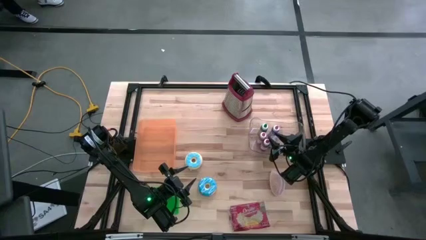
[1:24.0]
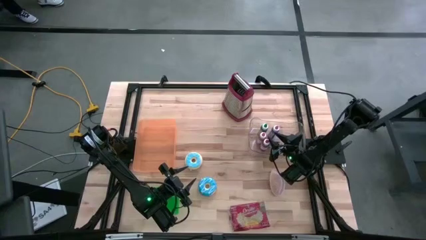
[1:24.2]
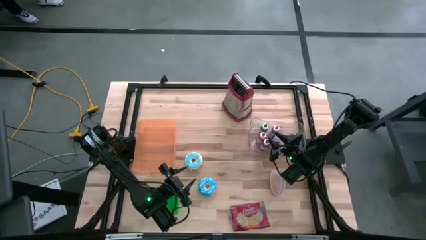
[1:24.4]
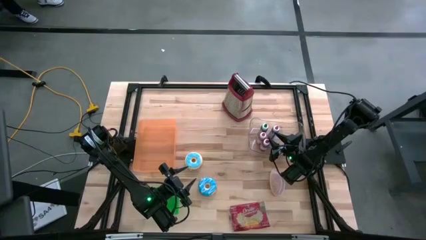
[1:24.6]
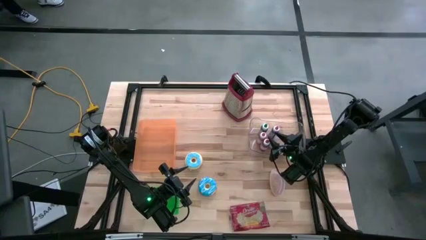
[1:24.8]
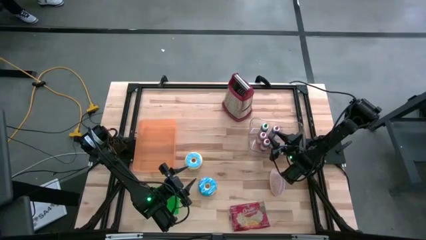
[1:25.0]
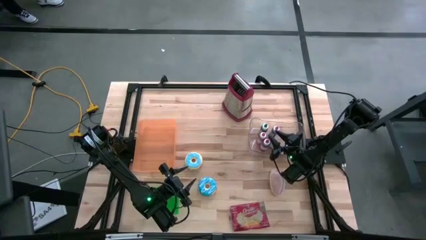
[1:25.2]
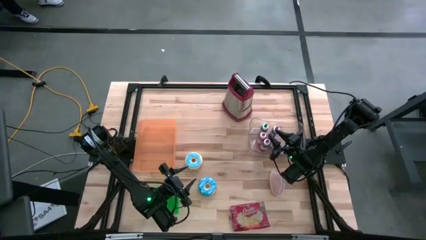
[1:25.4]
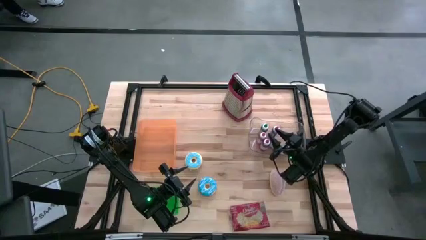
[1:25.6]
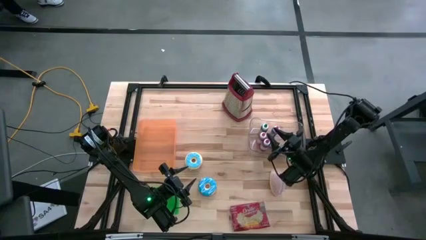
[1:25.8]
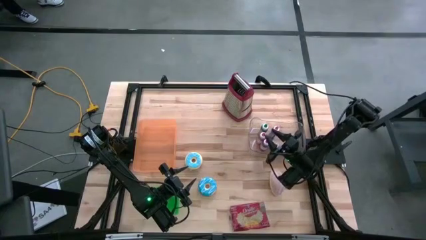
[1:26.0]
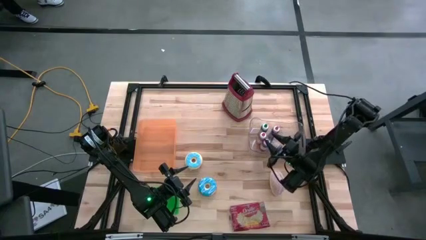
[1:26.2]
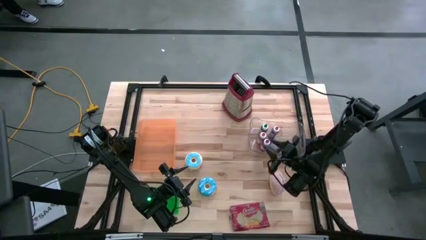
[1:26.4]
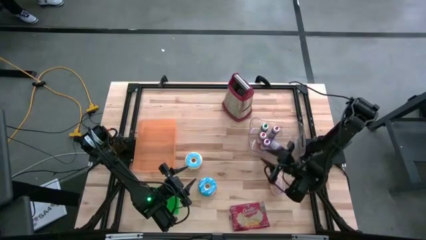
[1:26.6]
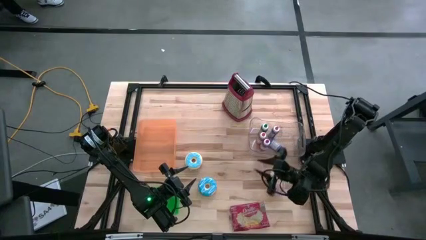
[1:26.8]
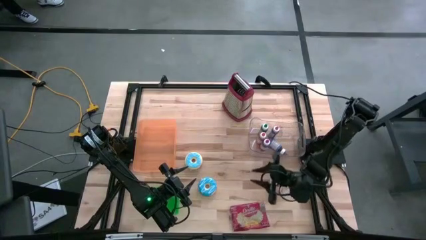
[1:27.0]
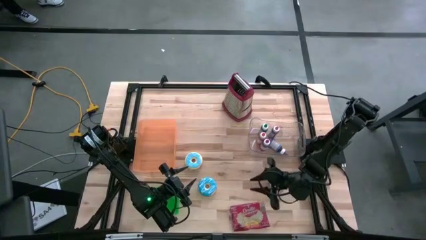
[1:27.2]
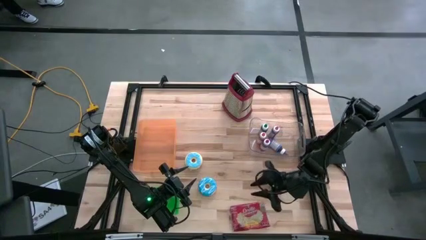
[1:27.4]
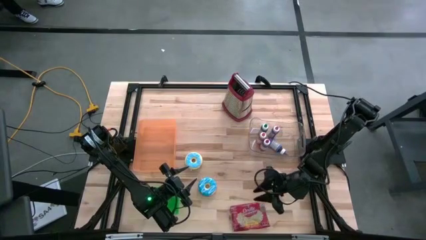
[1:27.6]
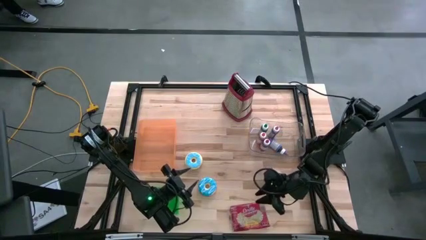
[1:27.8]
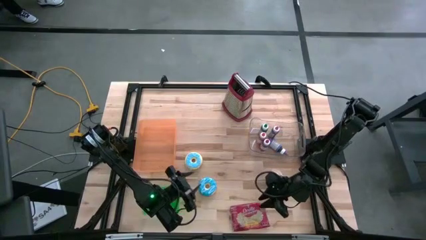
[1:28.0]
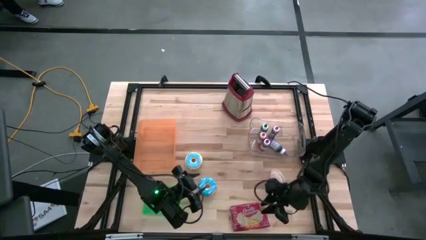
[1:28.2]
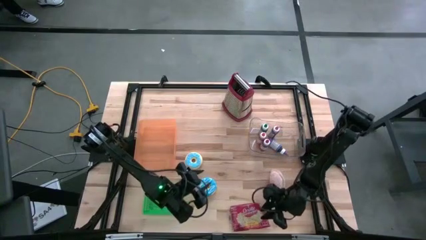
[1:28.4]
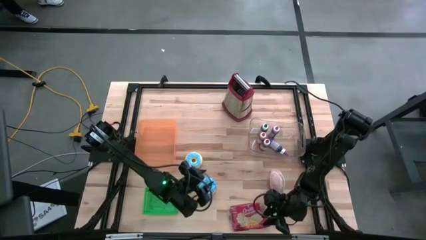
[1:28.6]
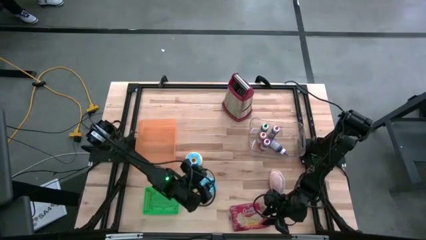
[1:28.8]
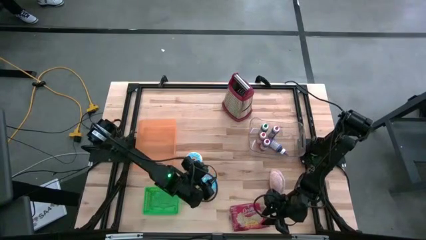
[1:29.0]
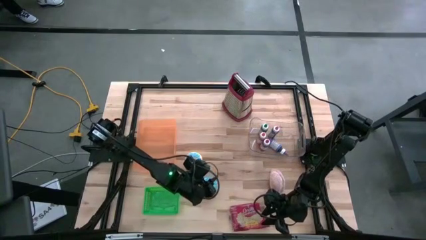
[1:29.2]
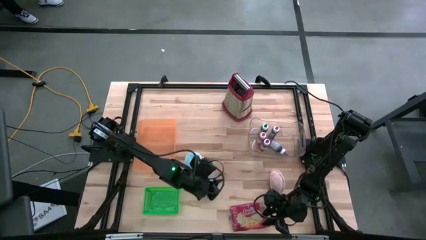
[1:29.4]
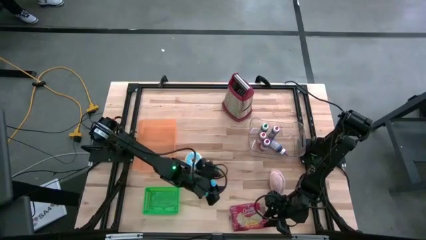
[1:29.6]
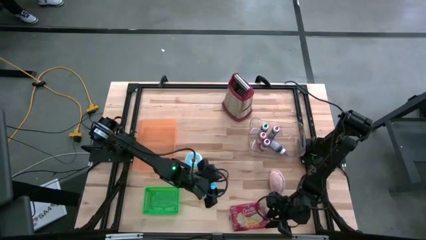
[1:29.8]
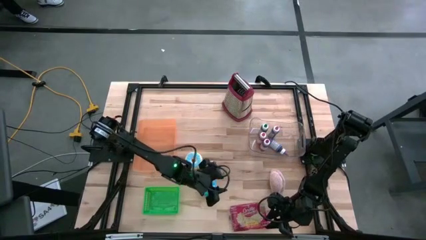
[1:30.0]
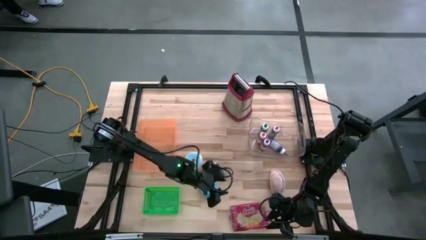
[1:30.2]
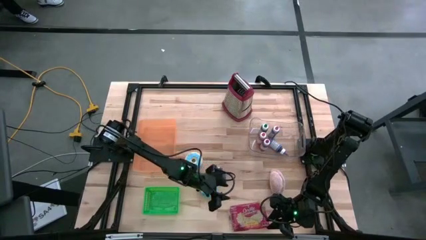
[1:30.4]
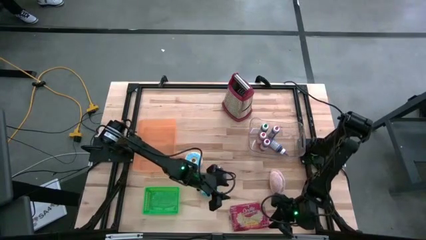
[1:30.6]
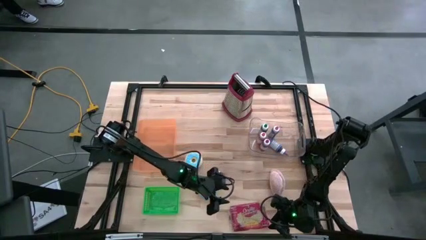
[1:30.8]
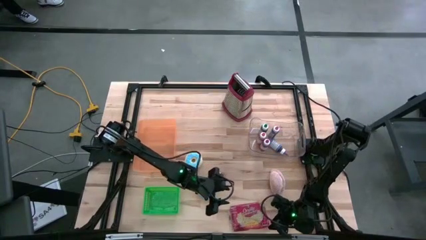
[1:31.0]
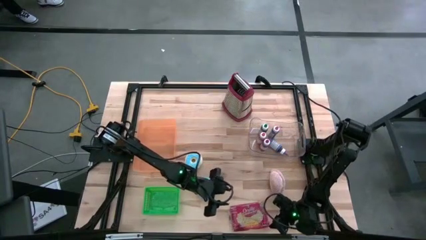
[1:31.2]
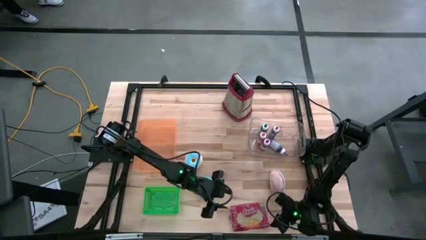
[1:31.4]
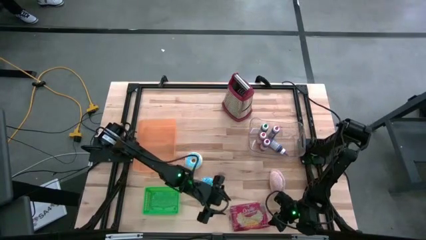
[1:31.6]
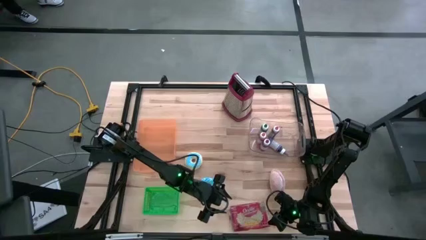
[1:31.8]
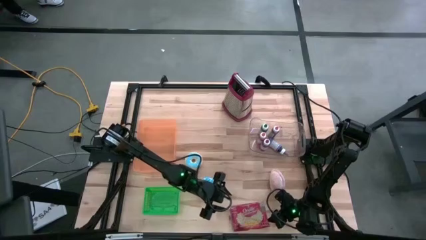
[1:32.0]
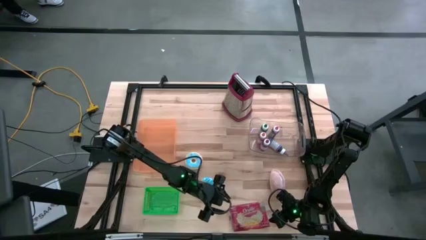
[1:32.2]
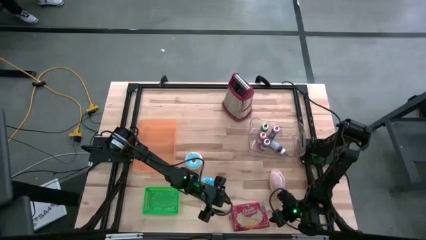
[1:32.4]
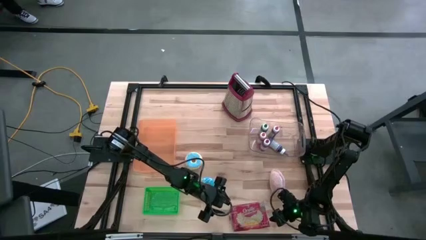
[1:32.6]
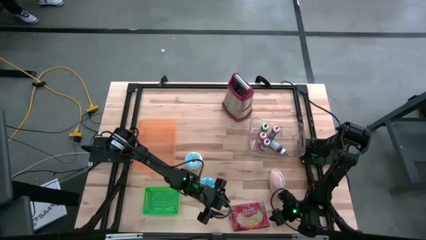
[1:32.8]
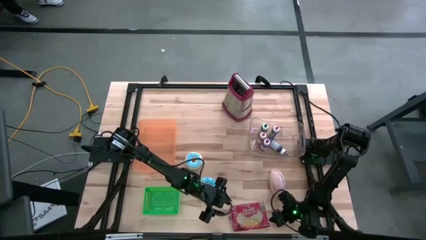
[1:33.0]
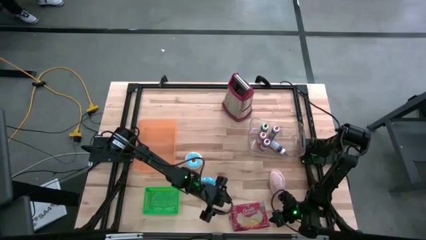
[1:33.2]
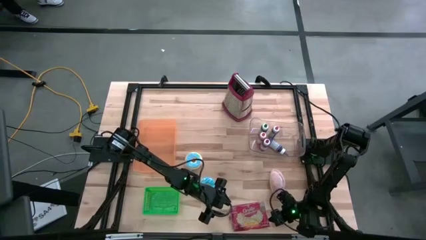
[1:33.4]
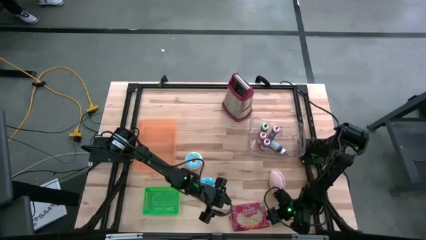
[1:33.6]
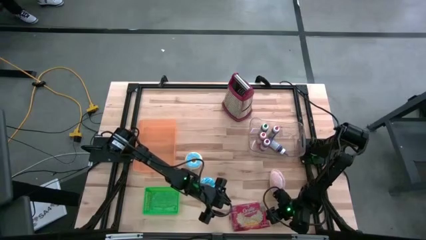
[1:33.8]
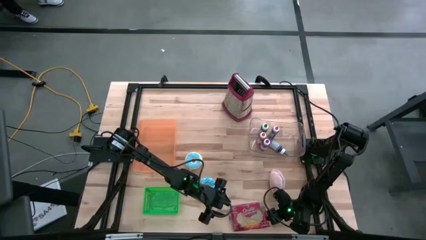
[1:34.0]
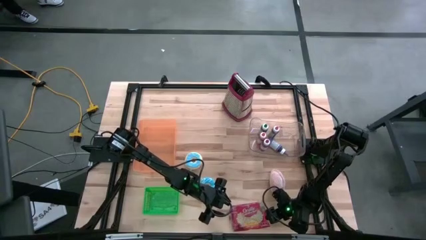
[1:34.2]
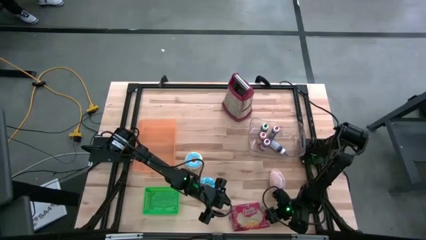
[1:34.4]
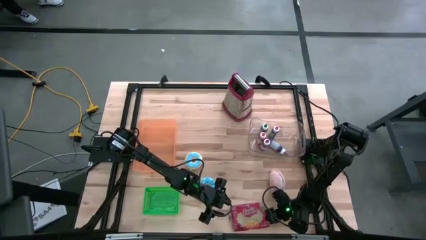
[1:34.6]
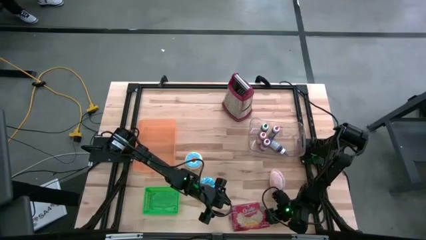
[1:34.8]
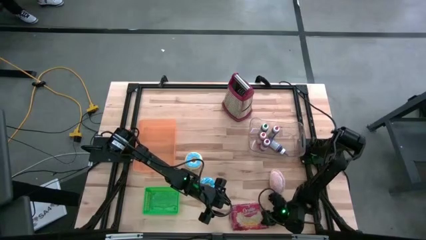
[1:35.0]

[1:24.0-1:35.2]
Put the popcorn bag into the orange bin

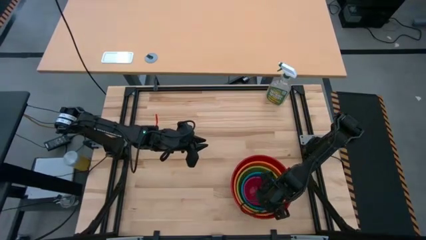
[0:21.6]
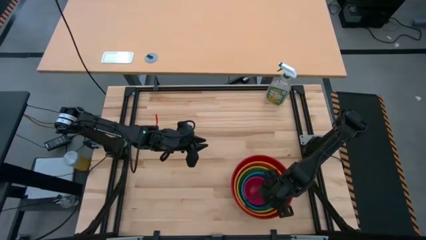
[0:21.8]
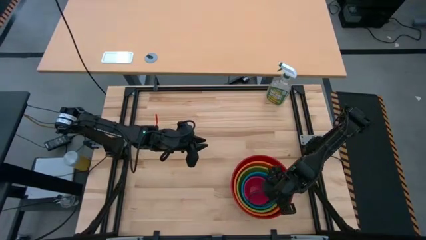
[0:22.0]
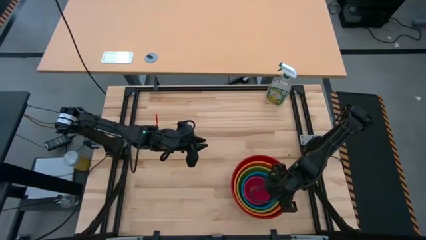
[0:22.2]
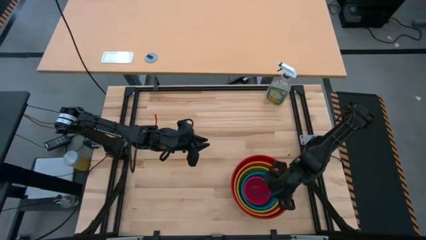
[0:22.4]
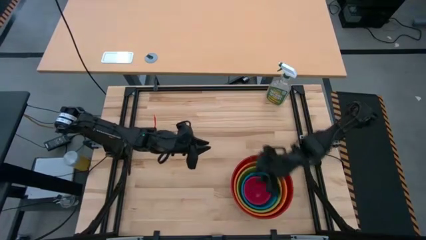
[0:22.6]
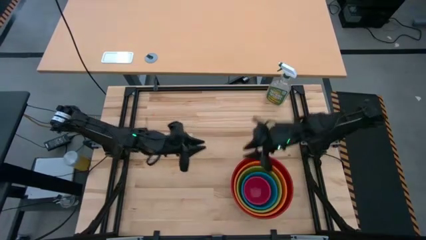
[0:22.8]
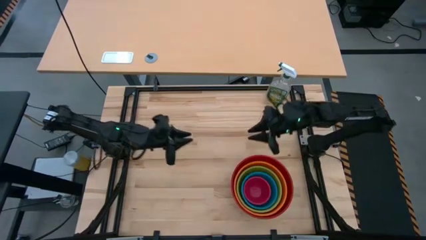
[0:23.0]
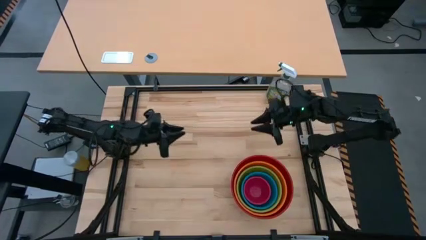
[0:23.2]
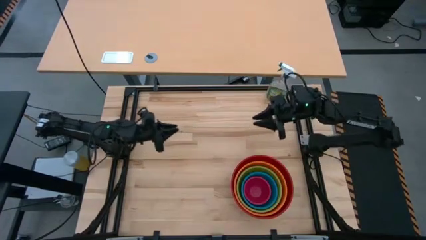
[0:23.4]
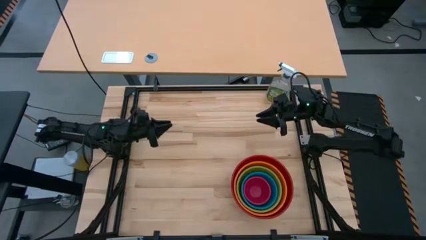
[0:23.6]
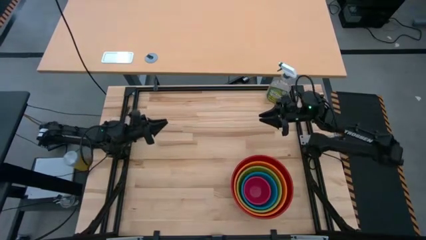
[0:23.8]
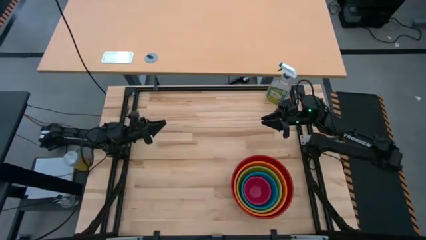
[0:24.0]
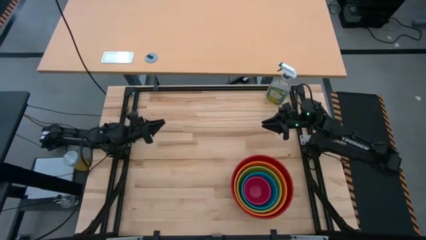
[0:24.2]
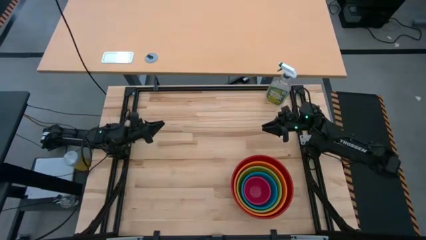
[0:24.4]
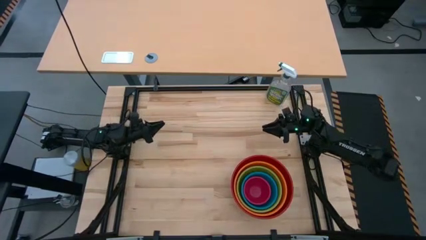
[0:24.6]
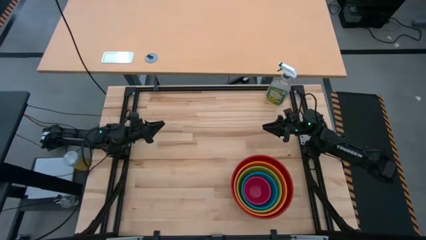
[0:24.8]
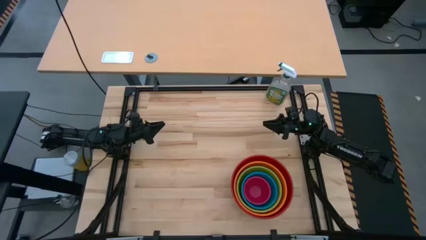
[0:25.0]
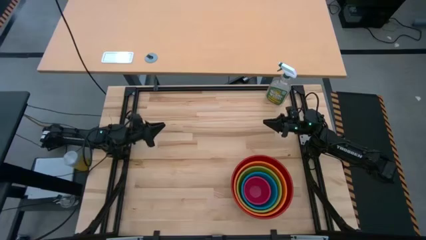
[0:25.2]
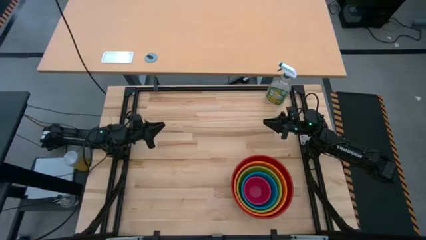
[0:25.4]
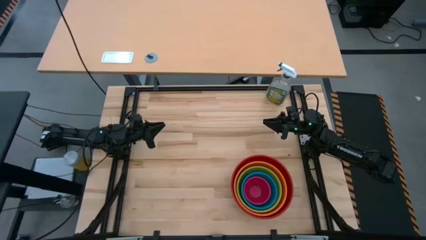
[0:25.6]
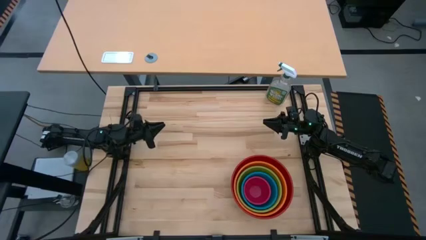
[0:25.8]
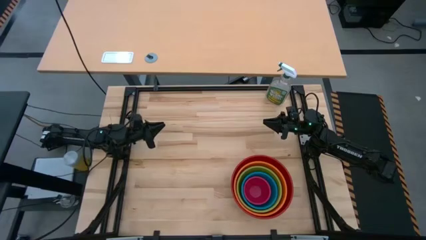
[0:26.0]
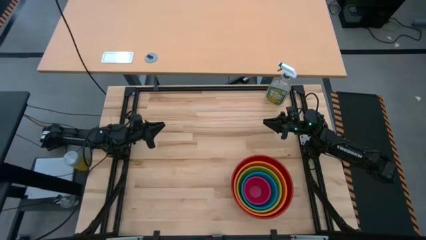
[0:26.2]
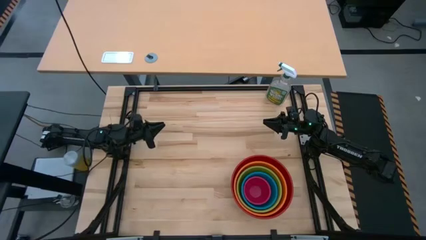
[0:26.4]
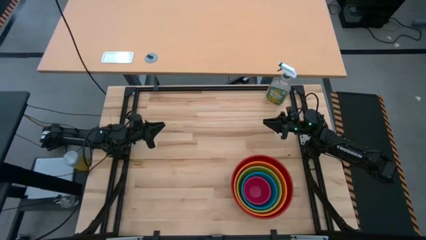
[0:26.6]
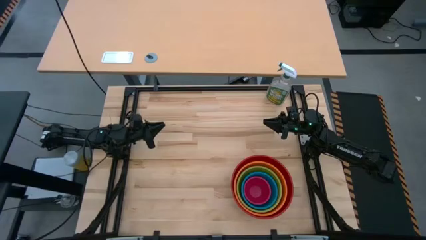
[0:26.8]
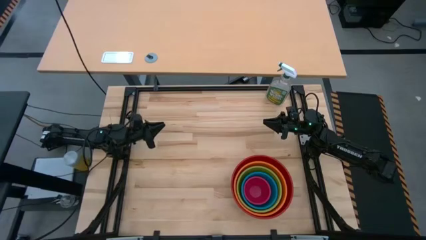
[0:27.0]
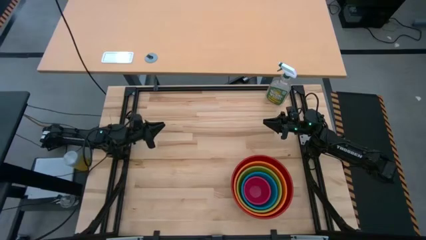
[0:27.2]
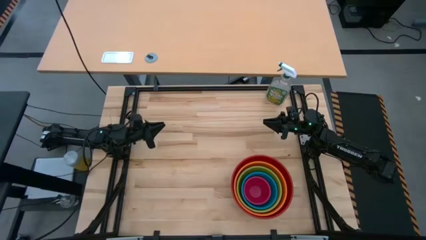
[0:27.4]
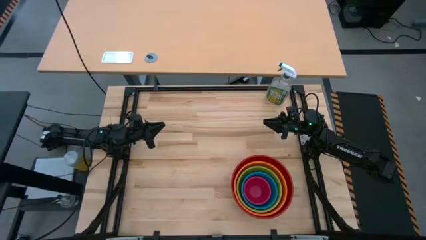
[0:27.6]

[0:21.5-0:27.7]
Return to Home Position
